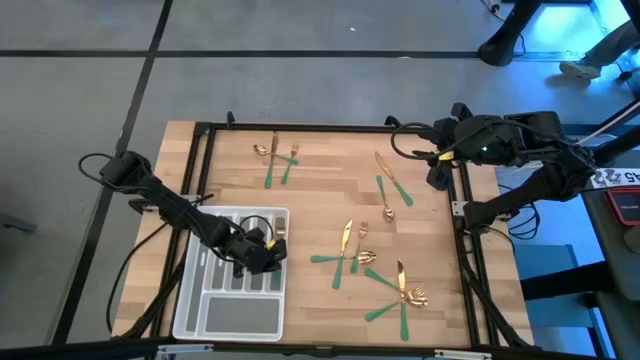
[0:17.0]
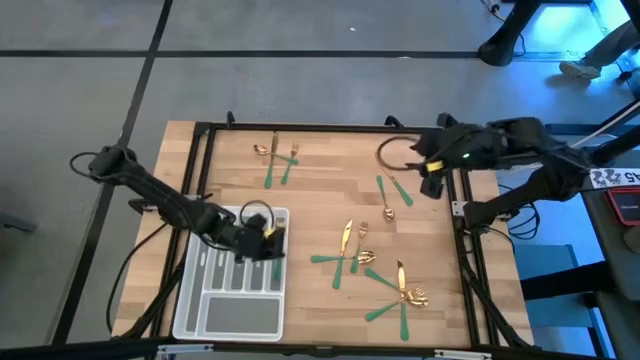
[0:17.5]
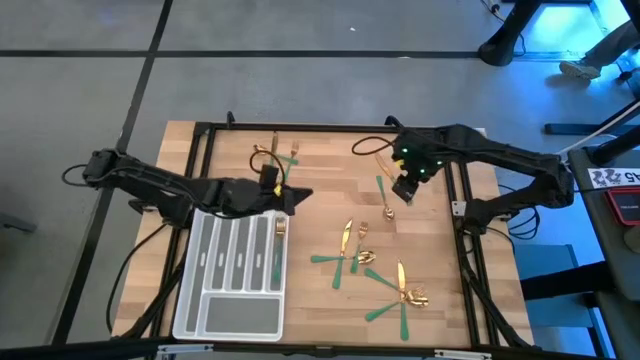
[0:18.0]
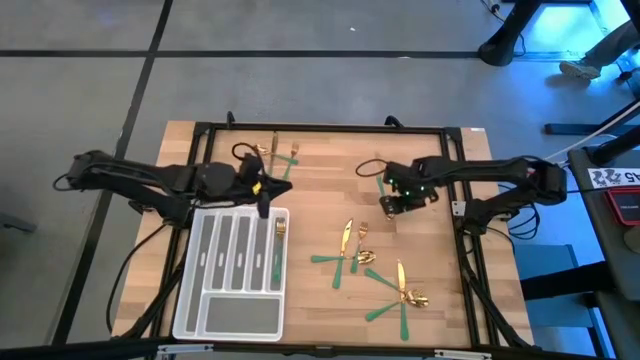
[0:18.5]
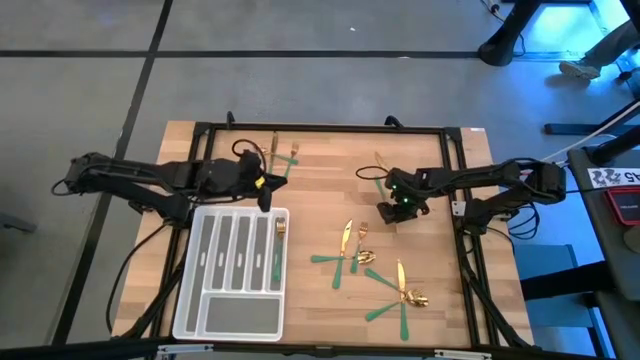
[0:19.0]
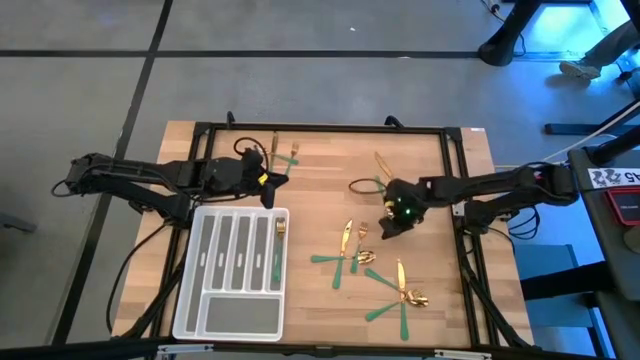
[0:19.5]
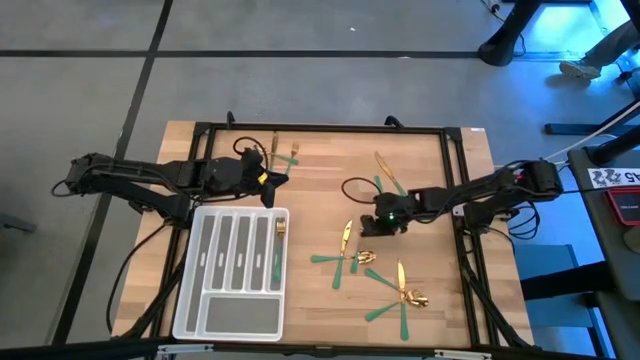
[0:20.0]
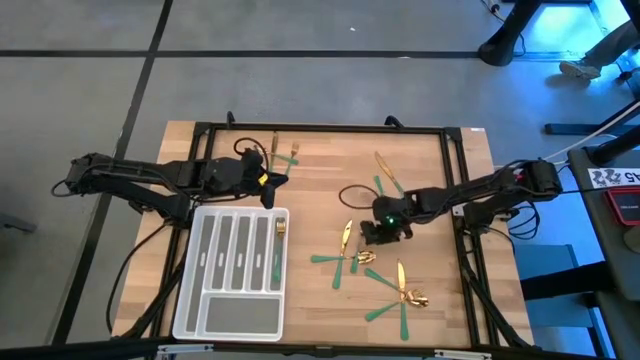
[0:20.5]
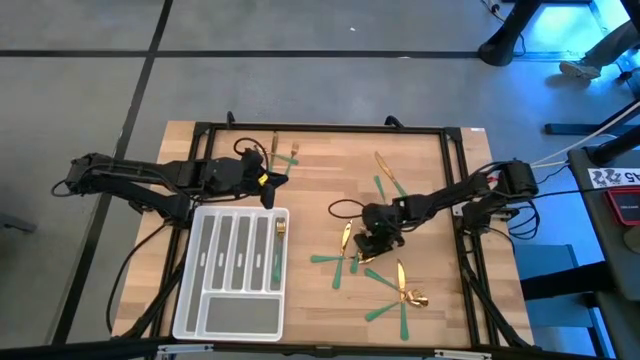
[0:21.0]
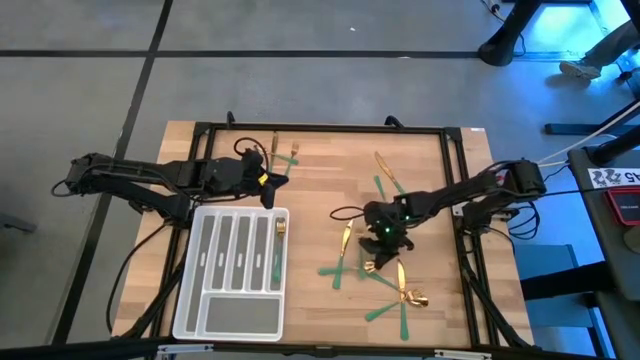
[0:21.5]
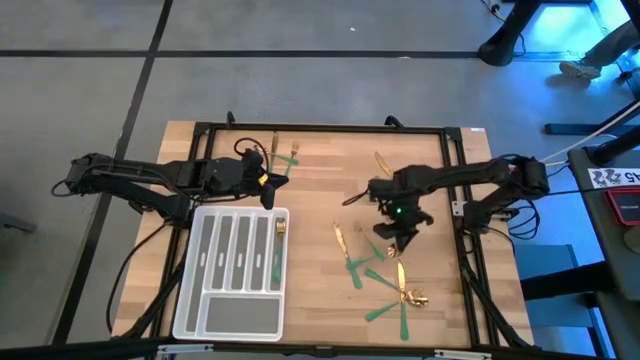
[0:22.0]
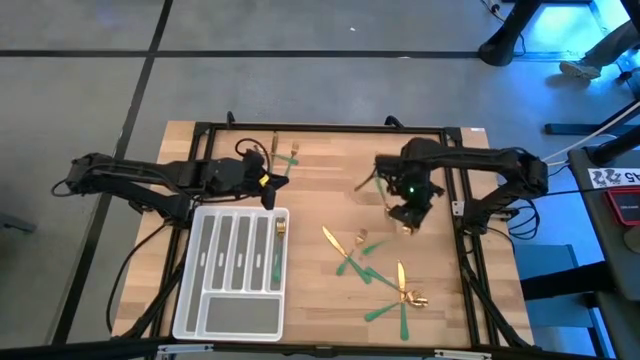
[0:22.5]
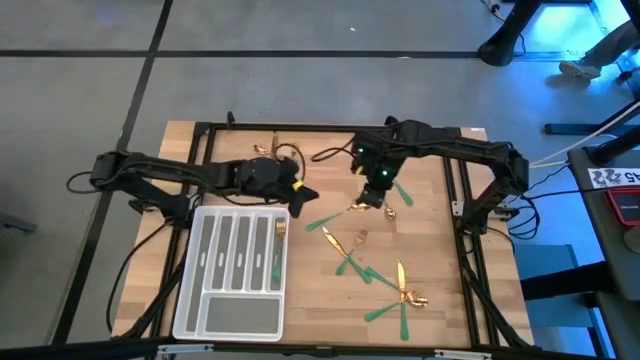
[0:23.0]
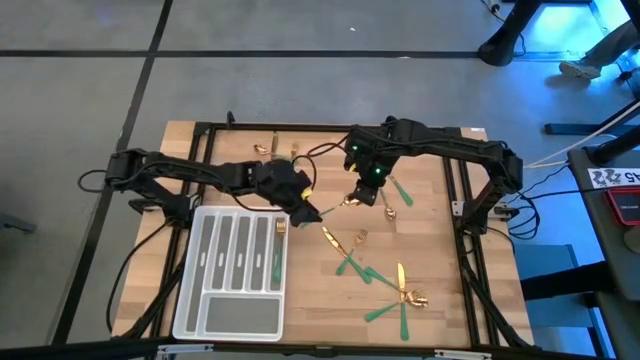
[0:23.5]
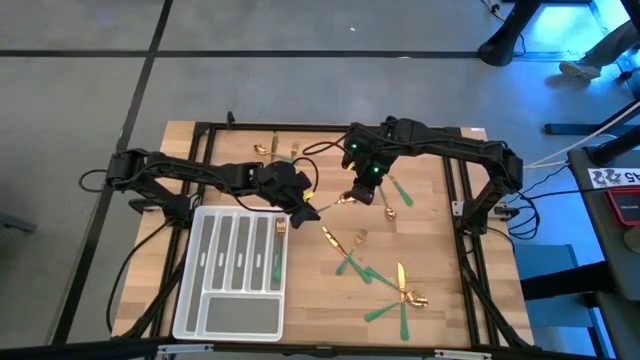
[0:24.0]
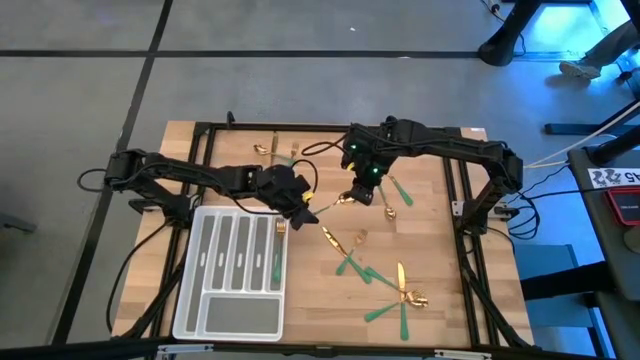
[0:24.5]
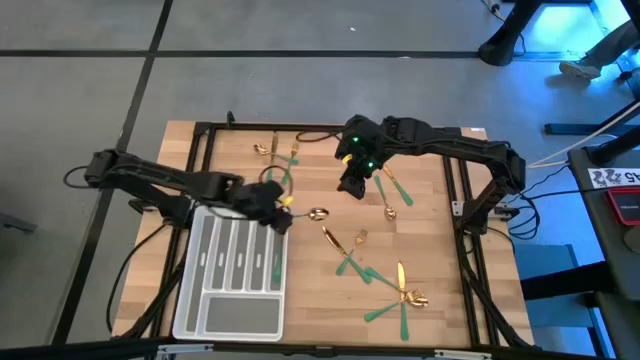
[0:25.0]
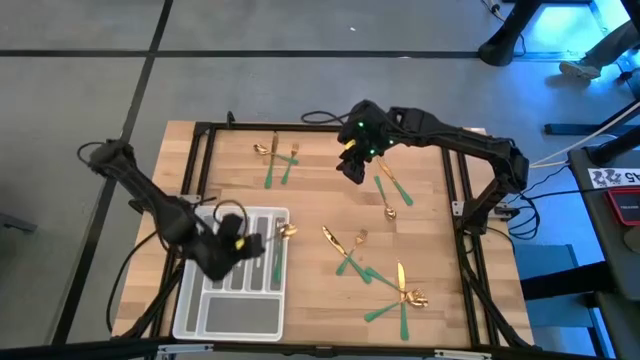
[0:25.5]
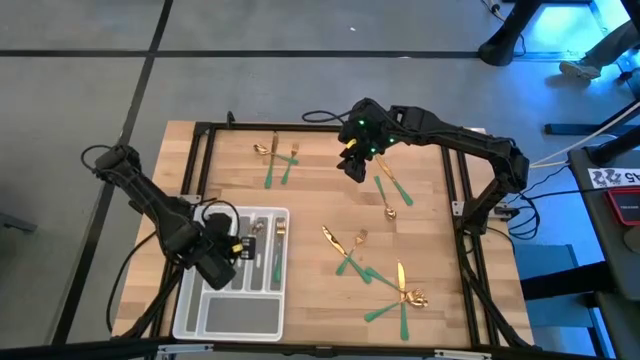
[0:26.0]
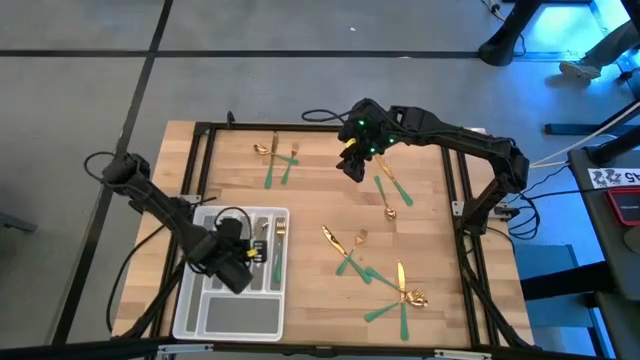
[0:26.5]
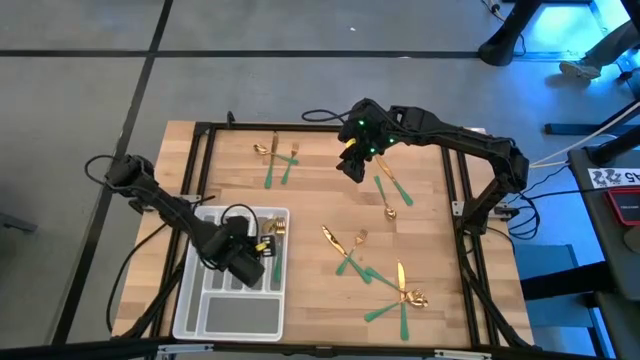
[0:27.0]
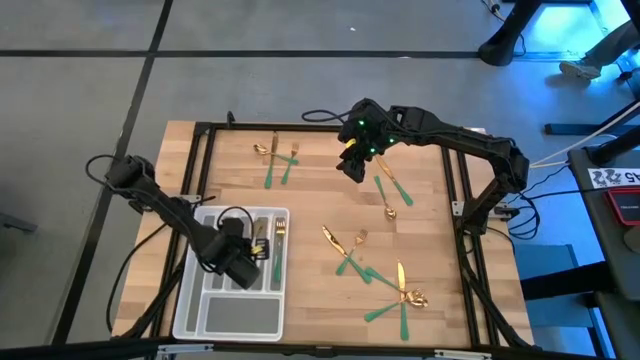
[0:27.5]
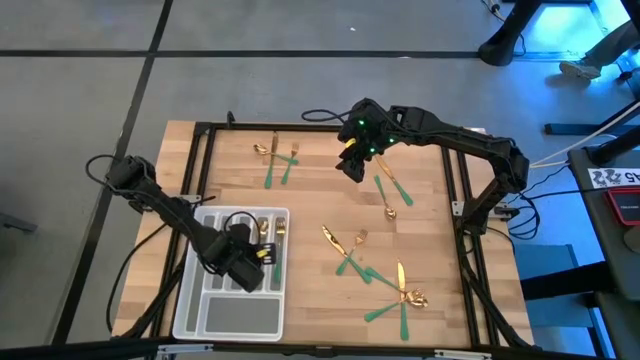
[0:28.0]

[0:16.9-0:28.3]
Task: Sort silverware
Put the spoon into the silverware tray

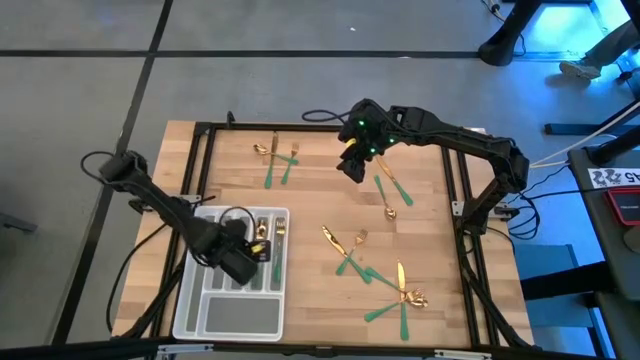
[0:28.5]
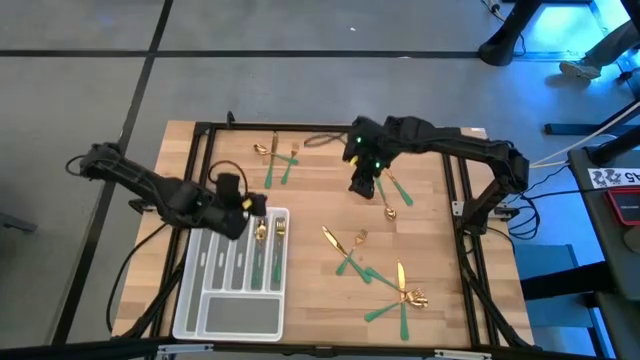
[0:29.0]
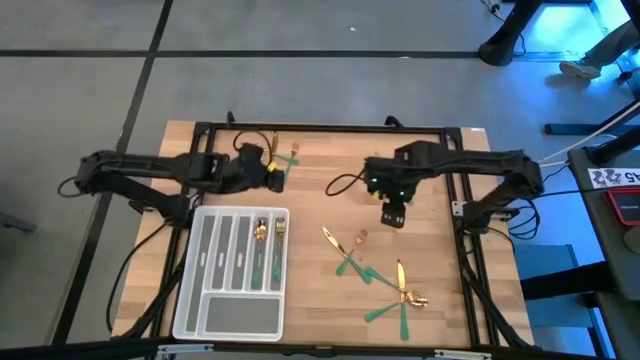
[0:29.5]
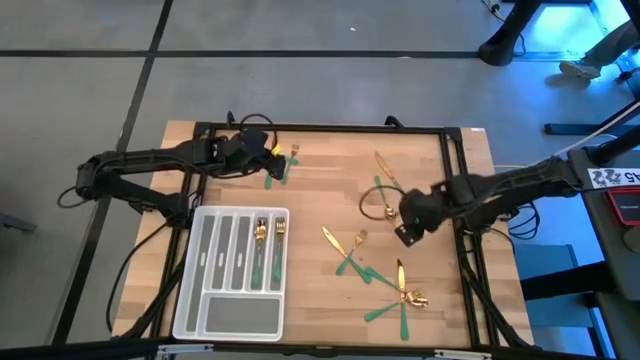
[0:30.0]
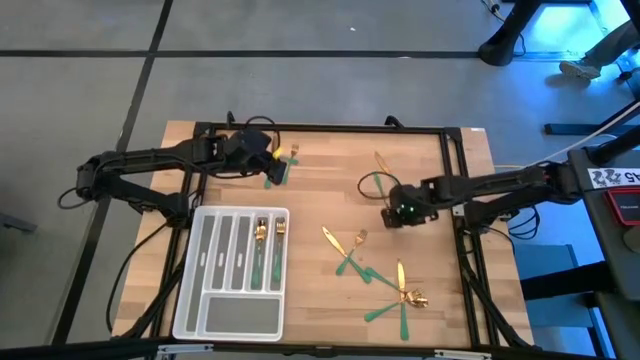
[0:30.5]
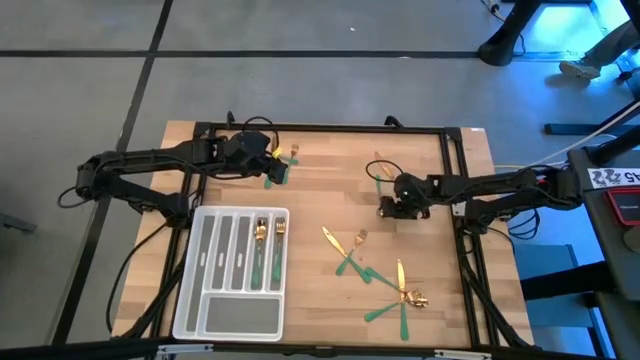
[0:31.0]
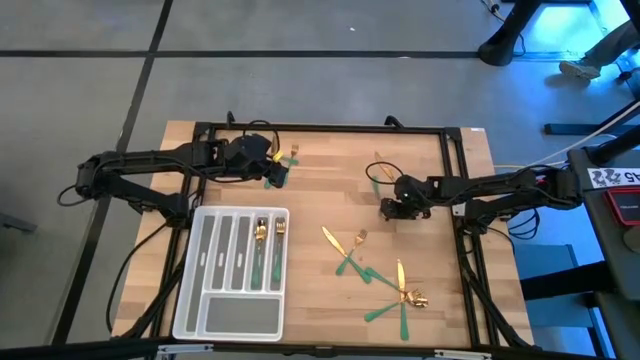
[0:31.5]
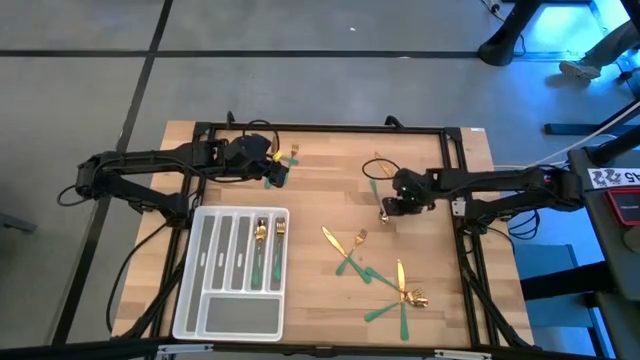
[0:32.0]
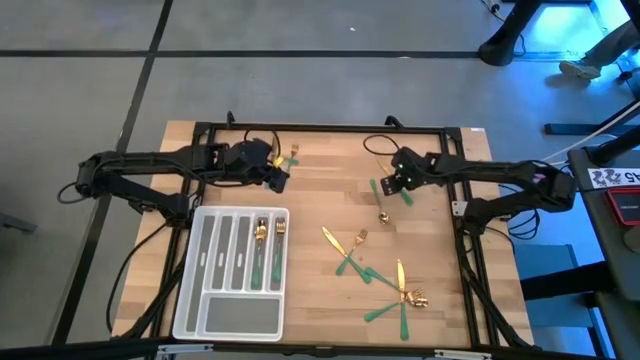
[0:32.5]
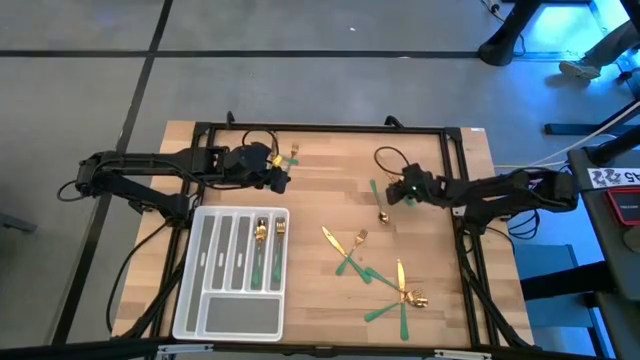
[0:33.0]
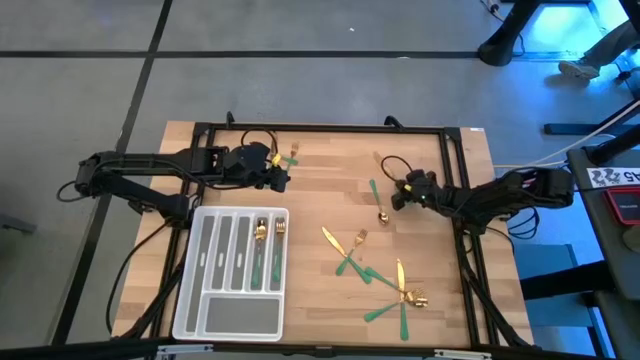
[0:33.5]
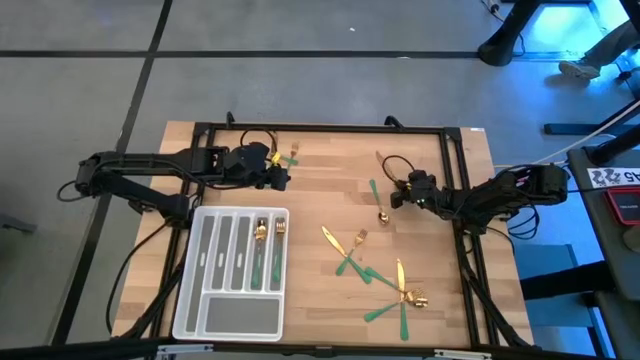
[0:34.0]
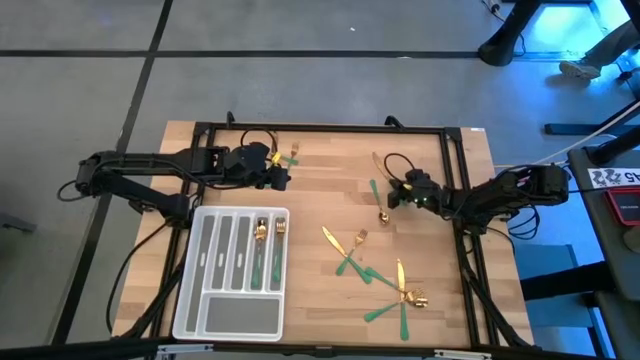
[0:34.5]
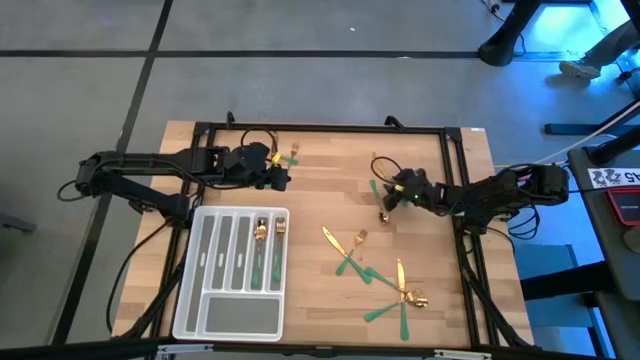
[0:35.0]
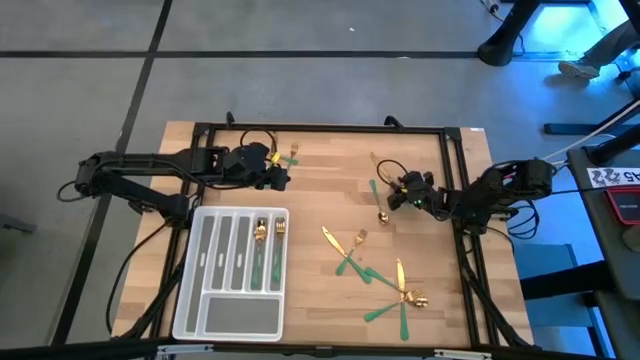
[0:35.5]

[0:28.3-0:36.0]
Put the knife into the silverware tray
